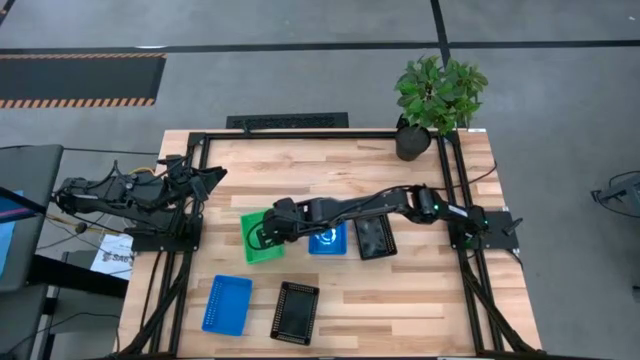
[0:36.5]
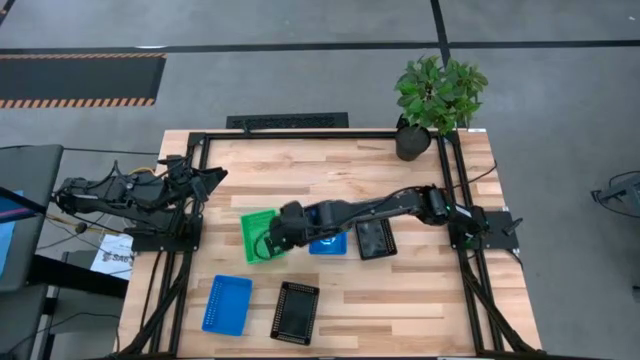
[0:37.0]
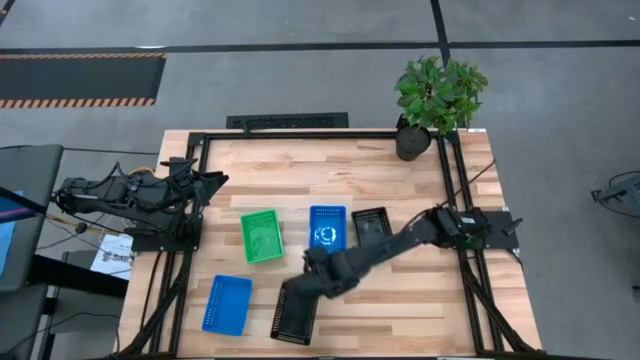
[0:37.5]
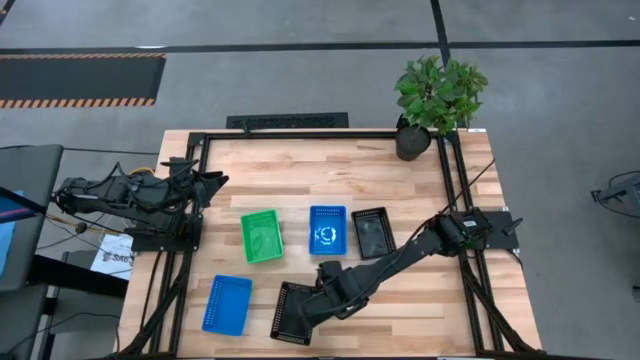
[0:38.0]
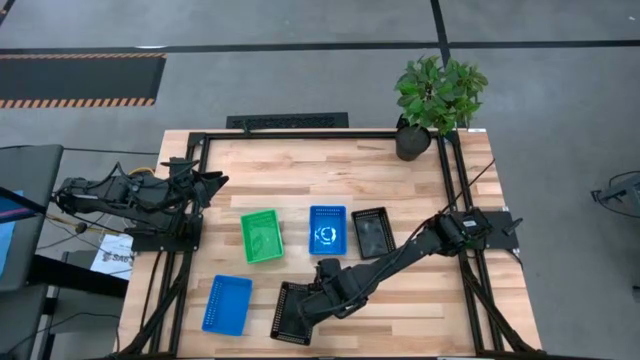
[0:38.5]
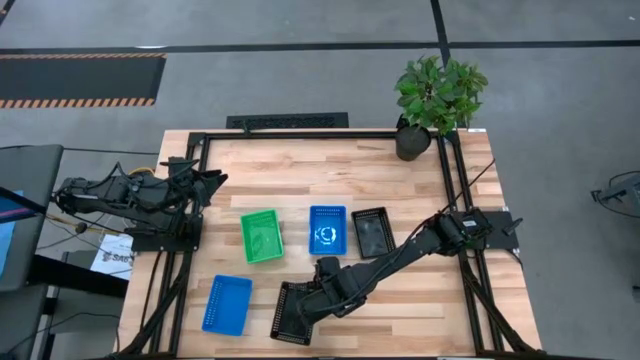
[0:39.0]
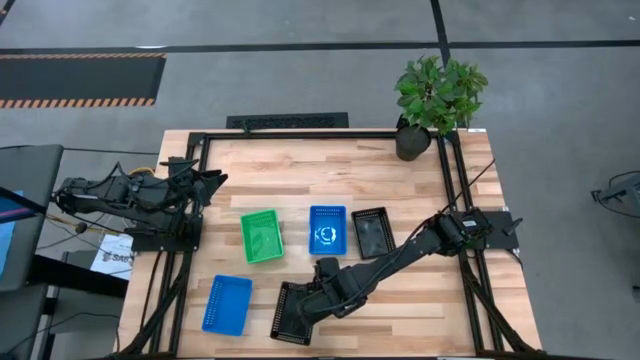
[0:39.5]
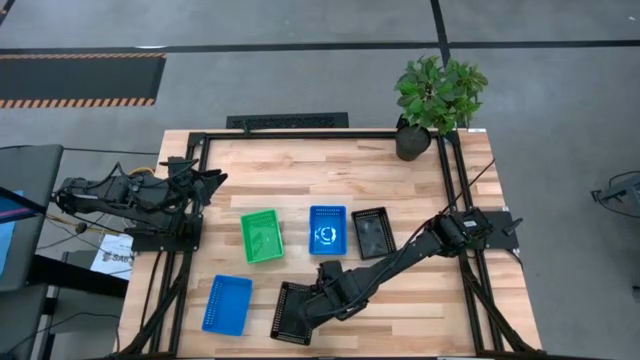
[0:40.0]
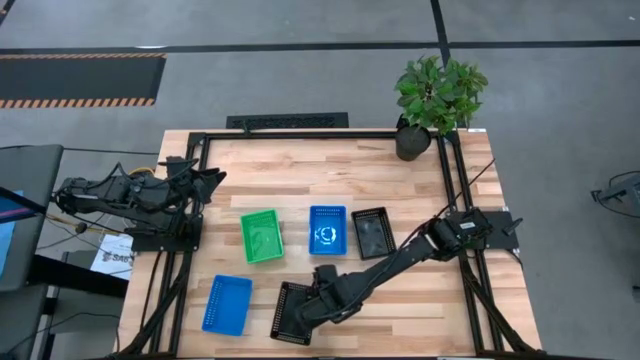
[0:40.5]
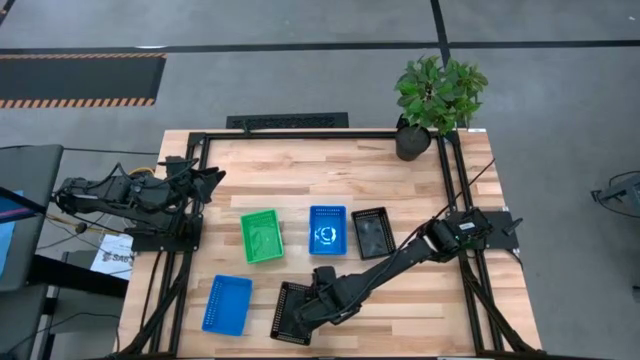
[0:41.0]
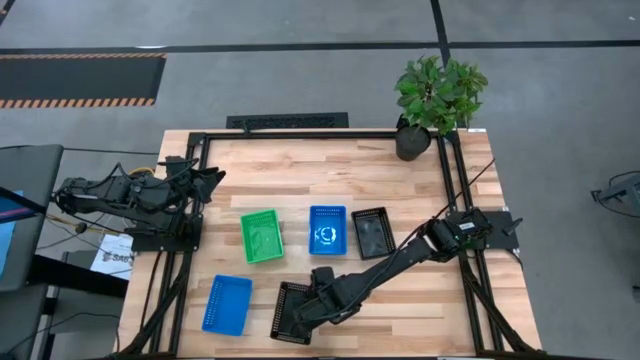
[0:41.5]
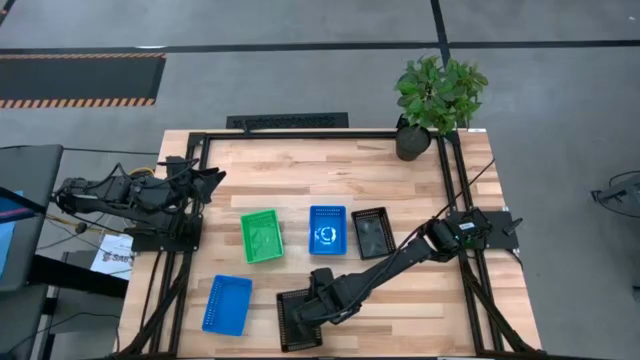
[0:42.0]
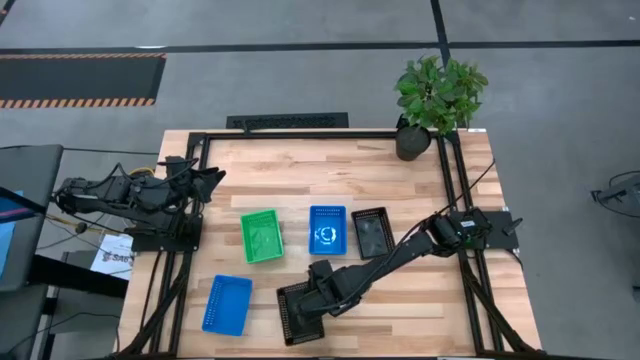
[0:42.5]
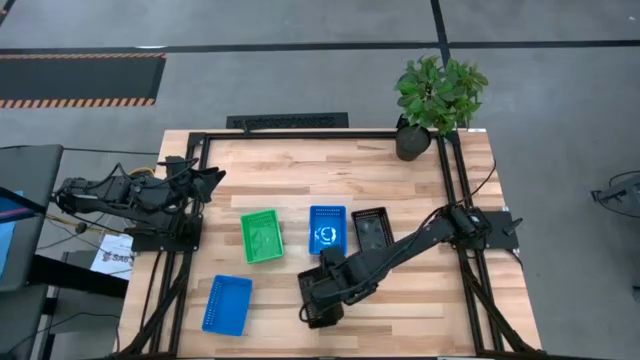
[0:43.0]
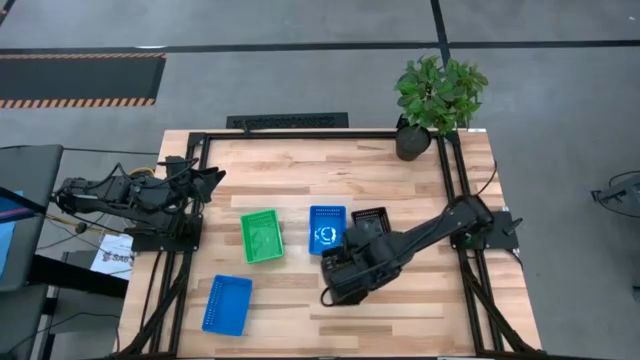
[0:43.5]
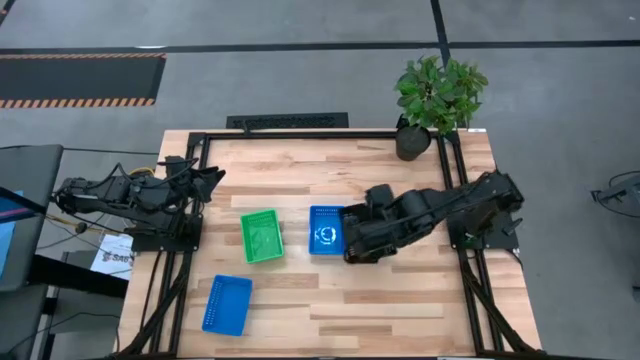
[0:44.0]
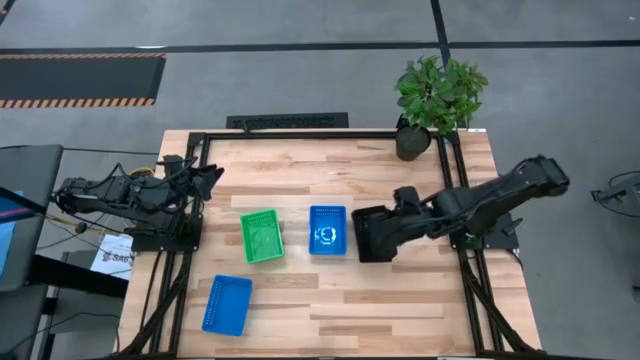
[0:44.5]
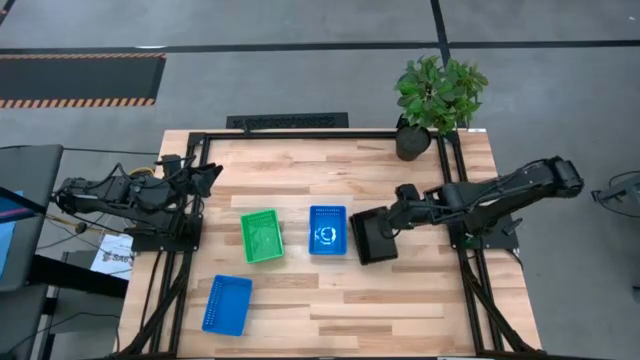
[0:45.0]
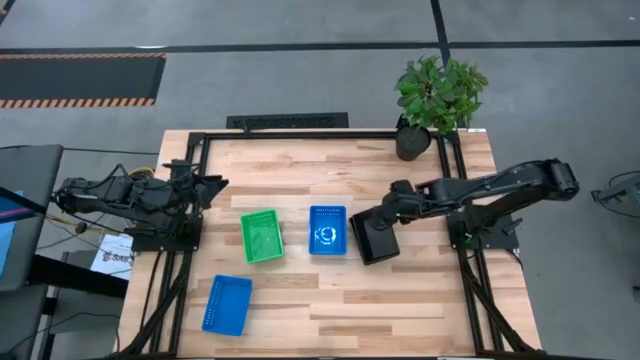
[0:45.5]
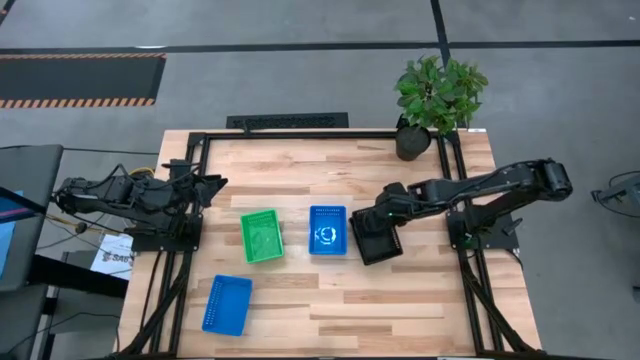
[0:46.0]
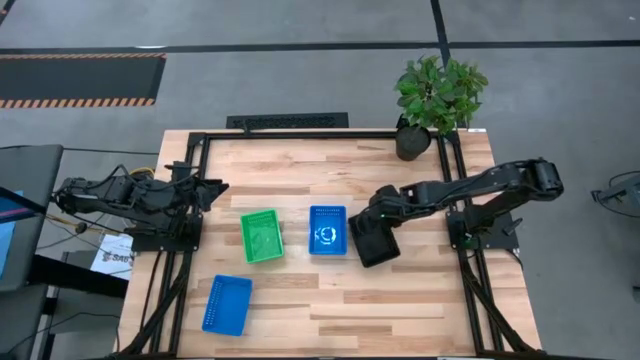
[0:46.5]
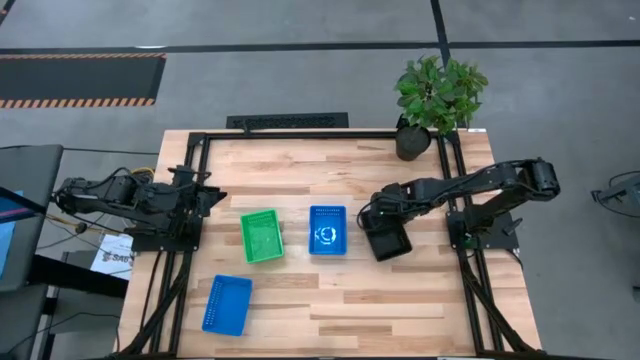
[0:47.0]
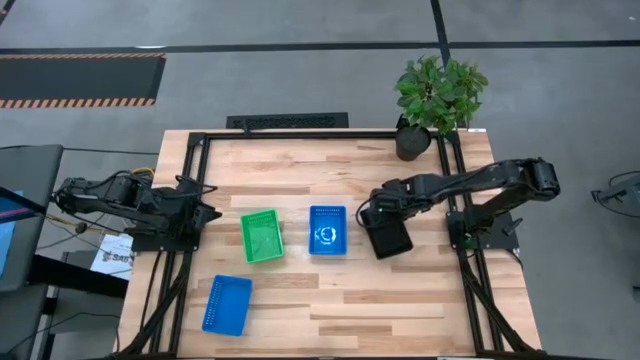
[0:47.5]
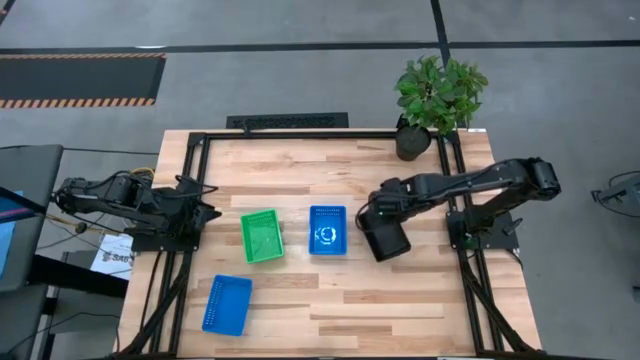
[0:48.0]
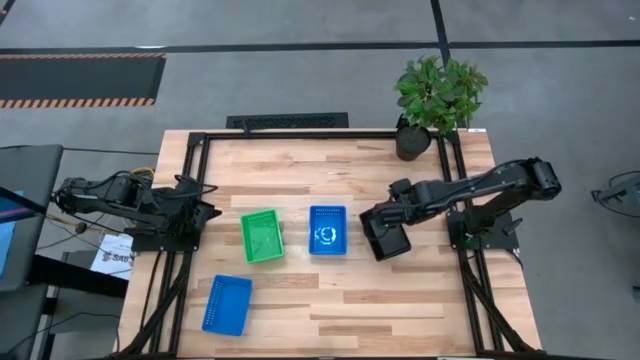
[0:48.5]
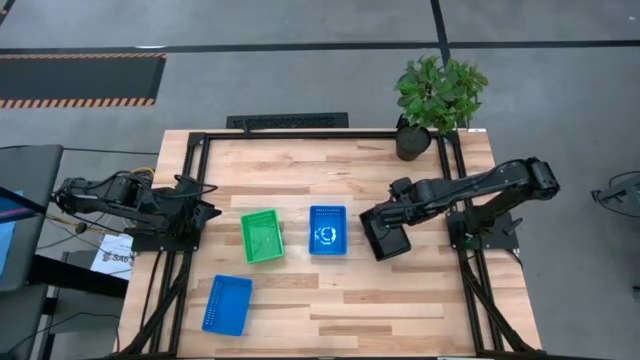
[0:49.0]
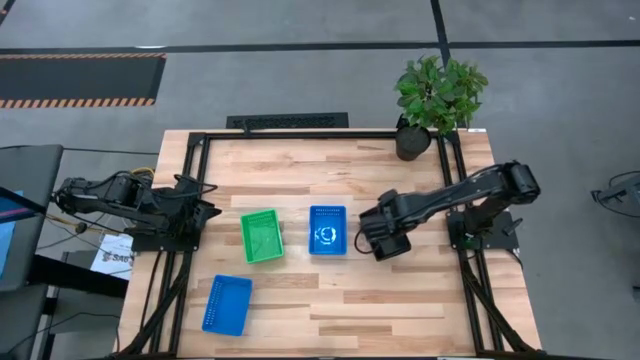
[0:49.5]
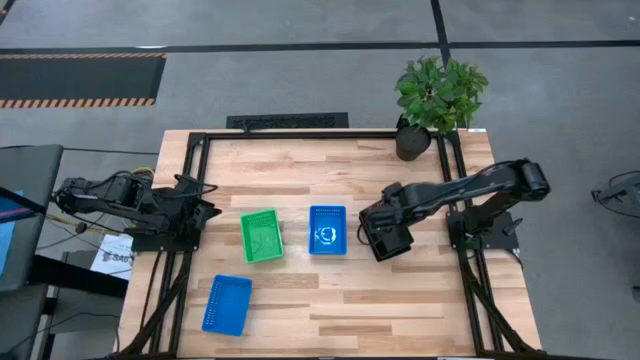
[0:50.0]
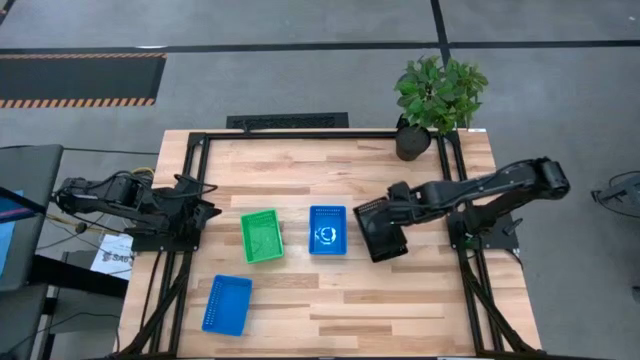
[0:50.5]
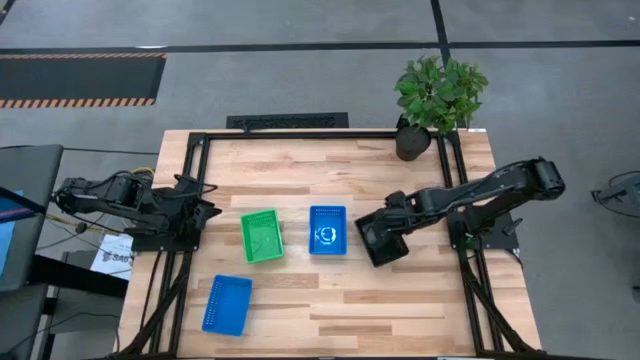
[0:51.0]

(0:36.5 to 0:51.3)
Stack the bottom black bin on top of the black bin

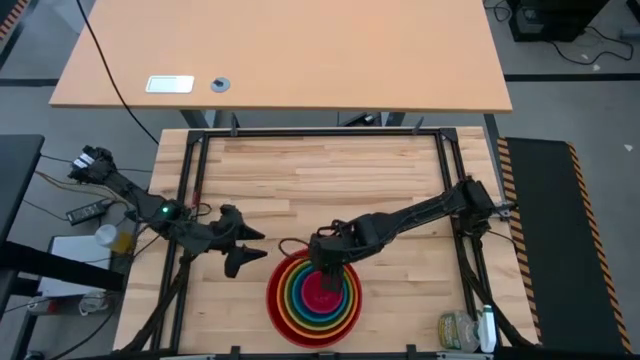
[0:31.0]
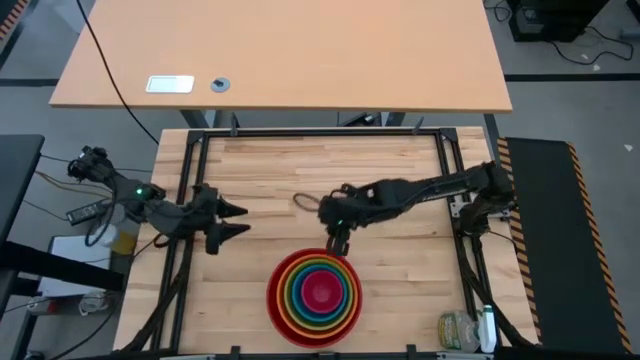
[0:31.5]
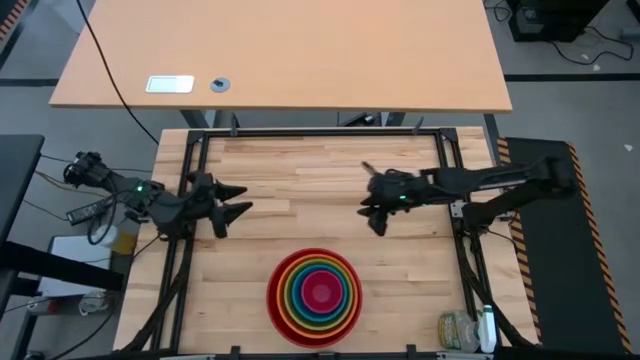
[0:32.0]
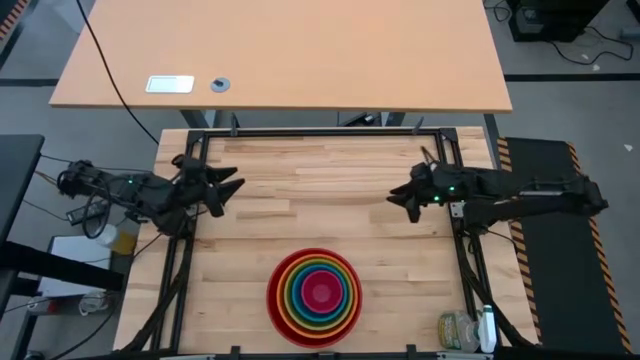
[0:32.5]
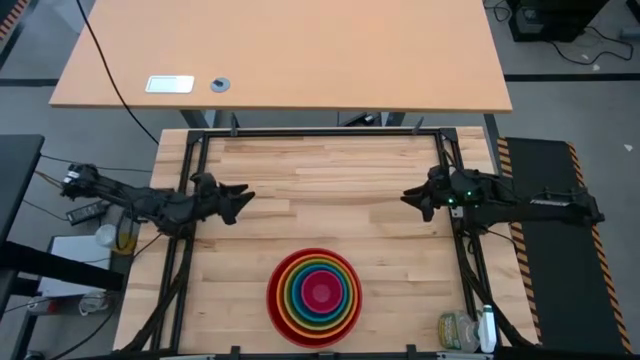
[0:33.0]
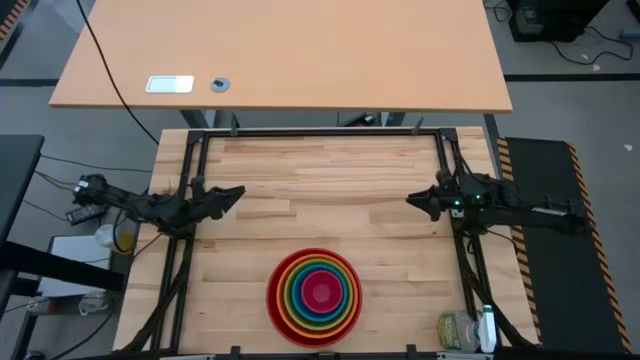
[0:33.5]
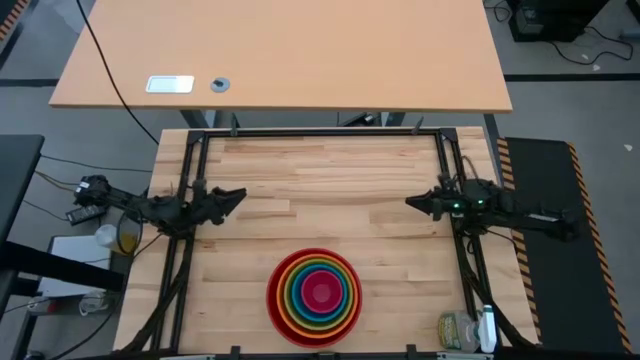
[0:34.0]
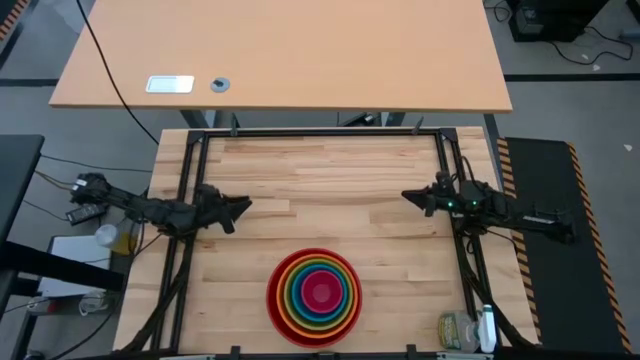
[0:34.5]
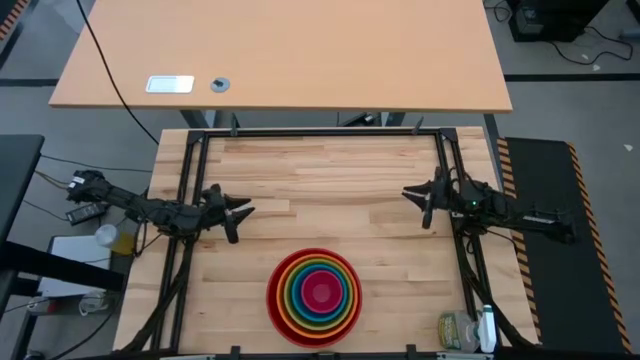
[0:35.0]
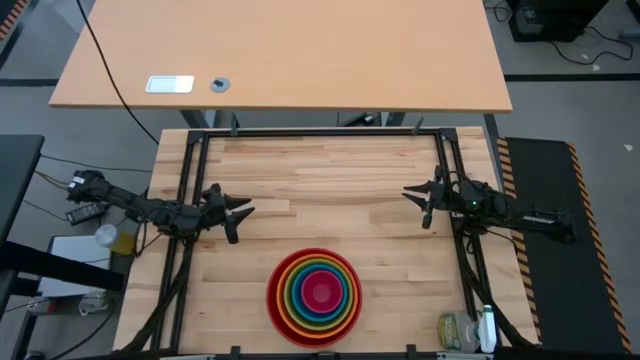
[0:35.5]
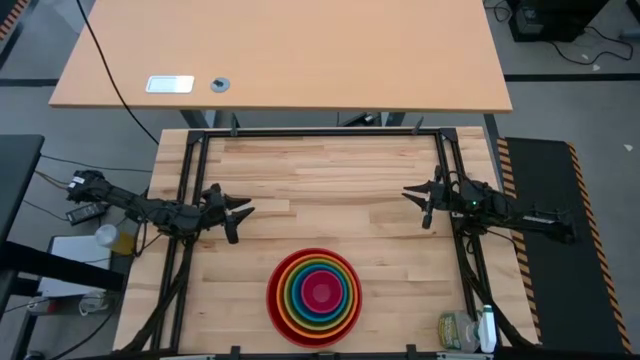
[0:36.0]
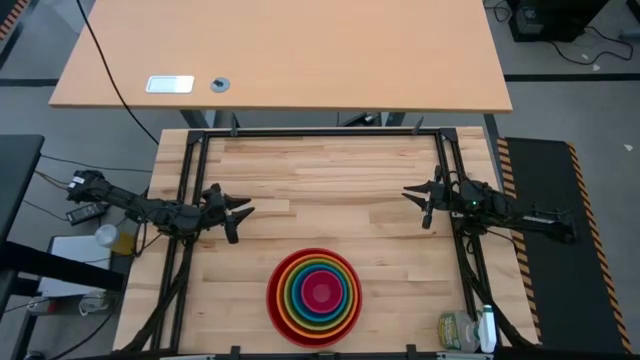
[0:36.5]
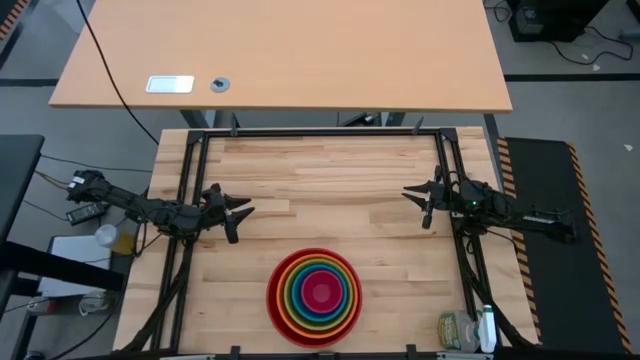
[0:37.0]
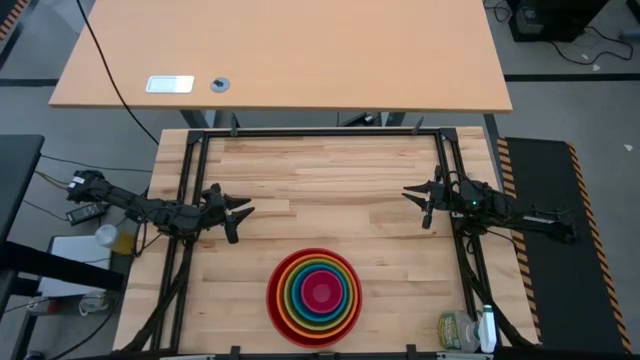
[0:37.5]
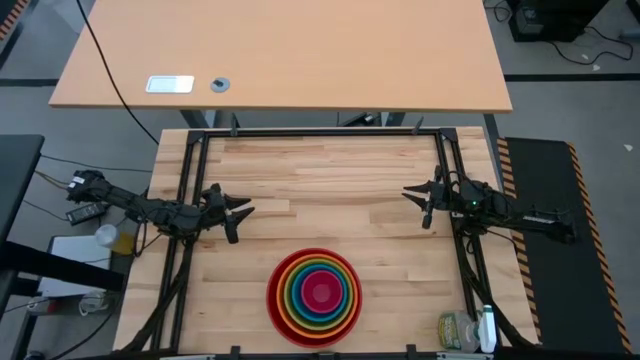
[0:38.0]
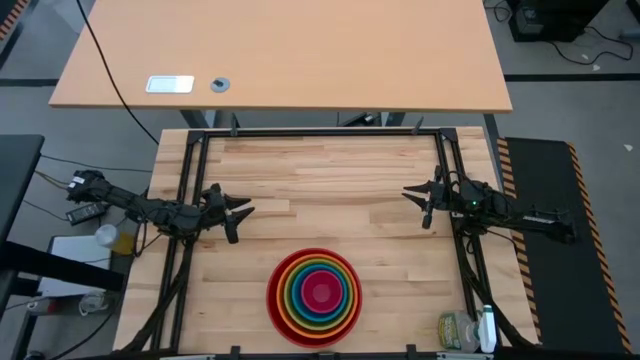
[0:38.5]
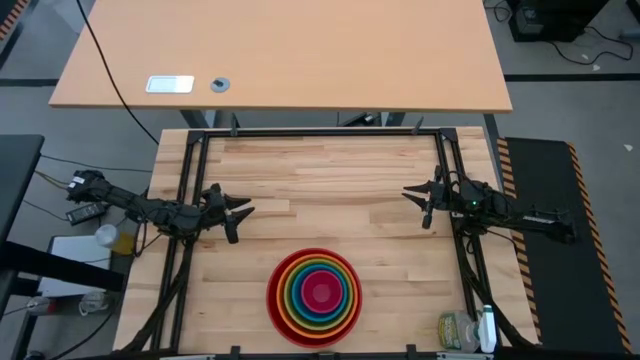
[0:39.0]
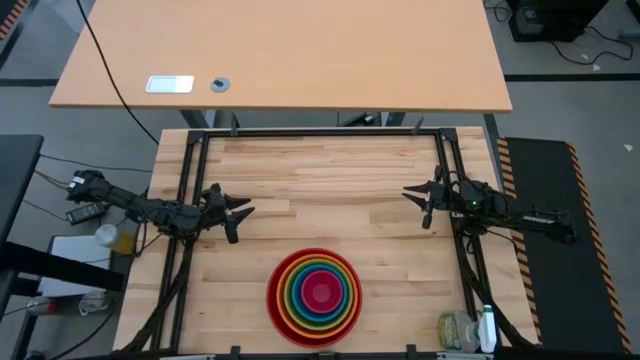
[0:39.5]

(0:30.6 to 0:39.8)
Return to Home Position
